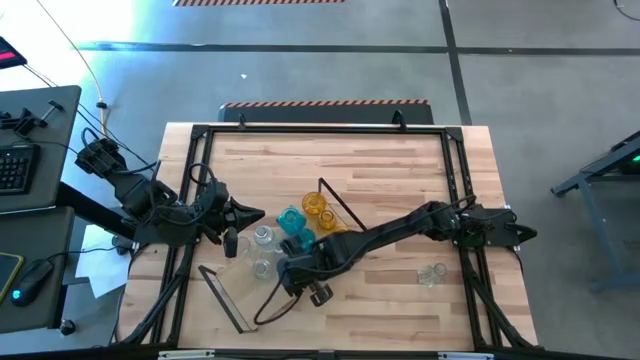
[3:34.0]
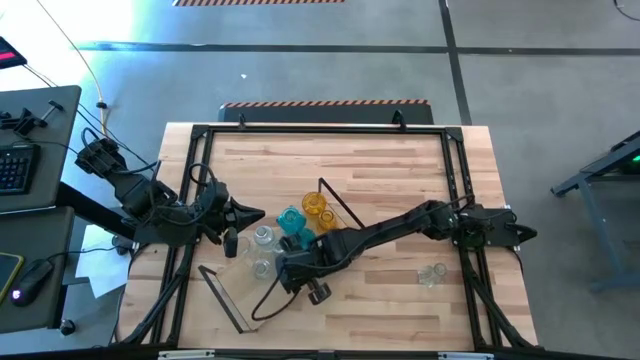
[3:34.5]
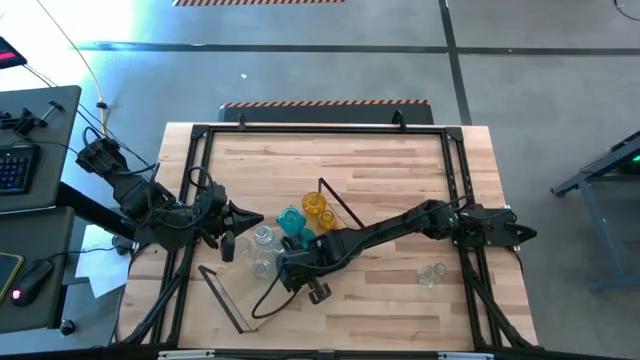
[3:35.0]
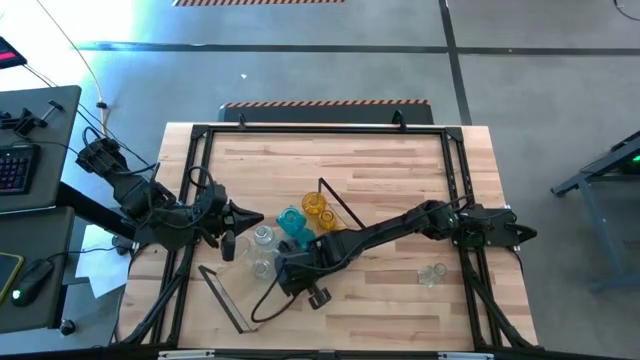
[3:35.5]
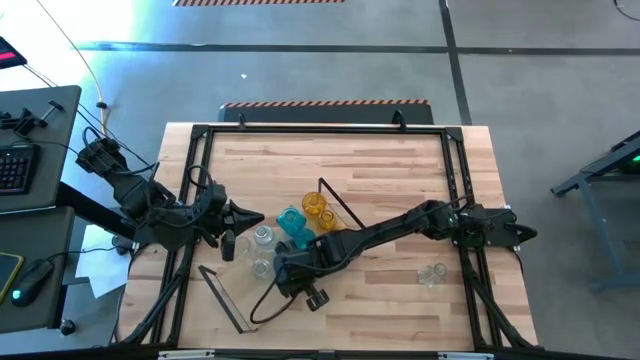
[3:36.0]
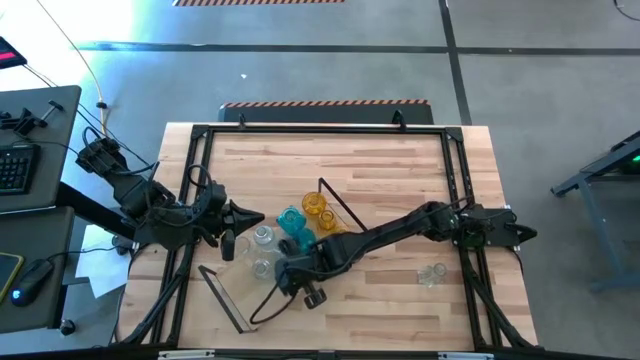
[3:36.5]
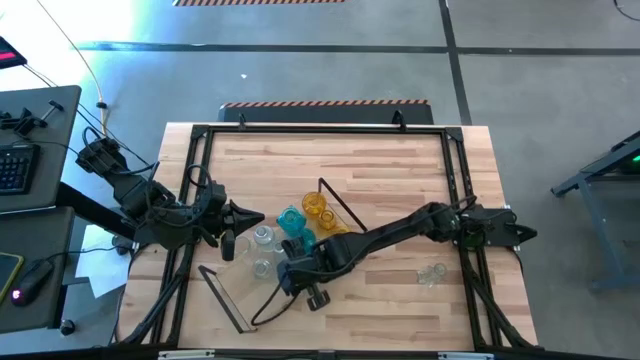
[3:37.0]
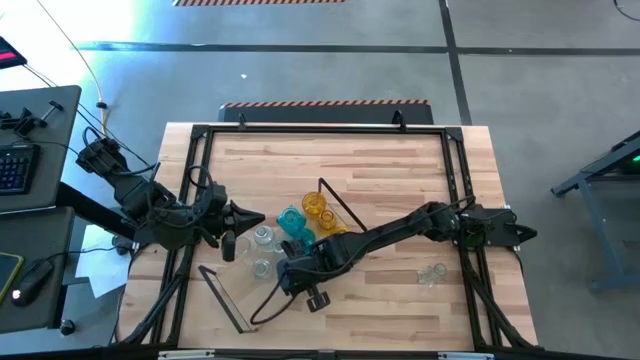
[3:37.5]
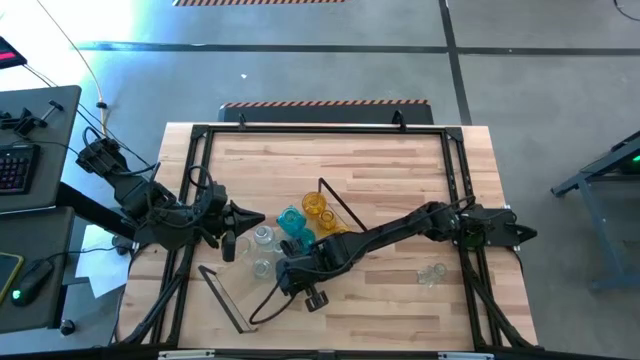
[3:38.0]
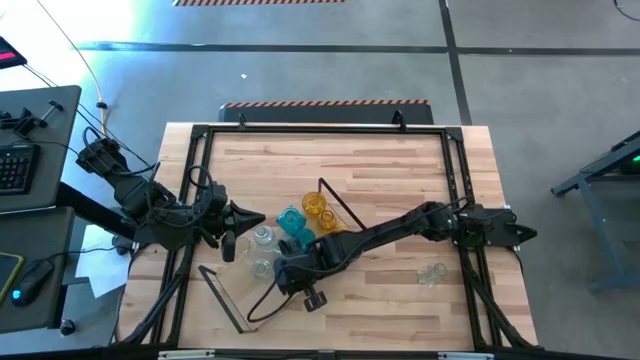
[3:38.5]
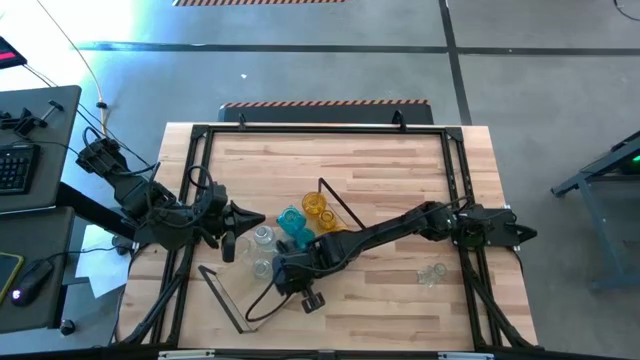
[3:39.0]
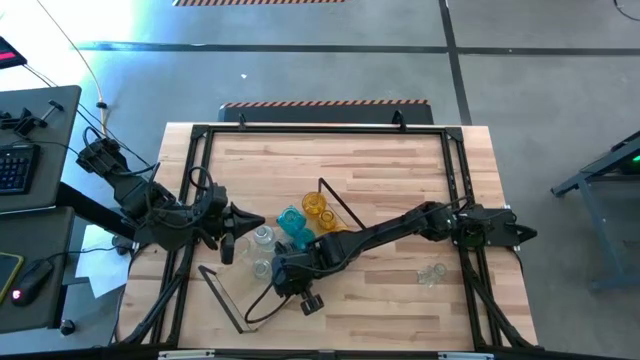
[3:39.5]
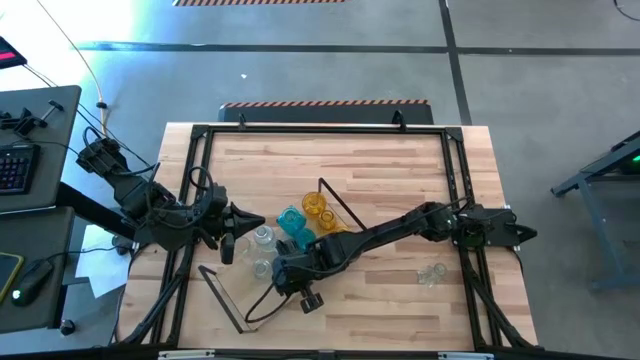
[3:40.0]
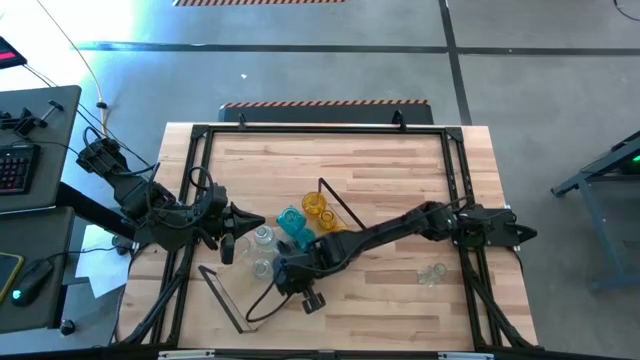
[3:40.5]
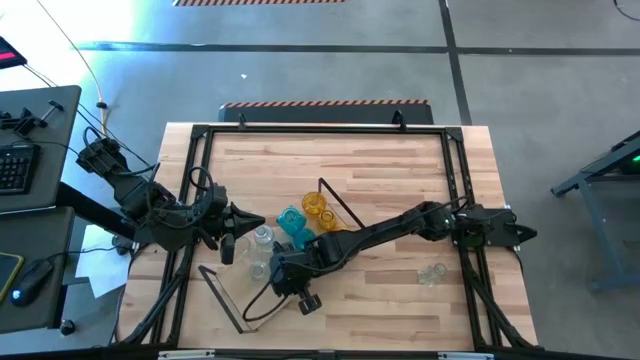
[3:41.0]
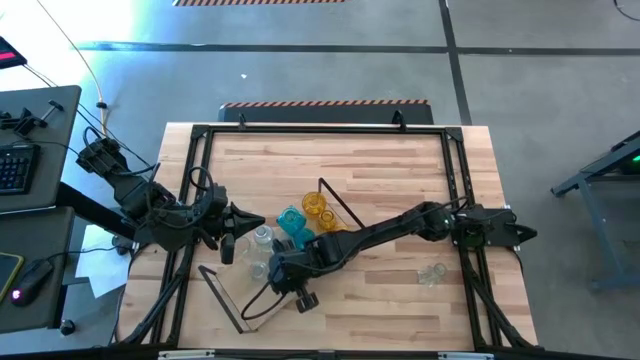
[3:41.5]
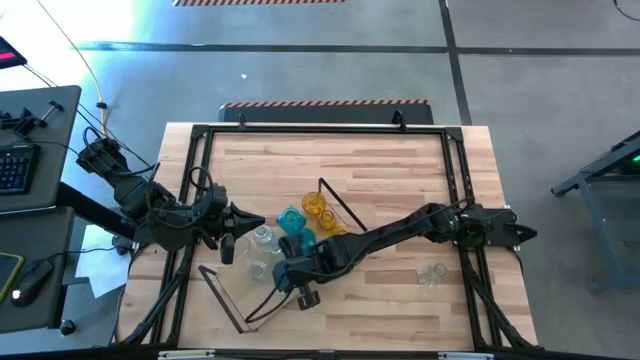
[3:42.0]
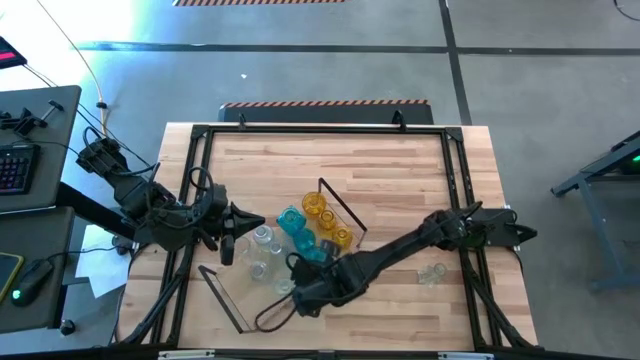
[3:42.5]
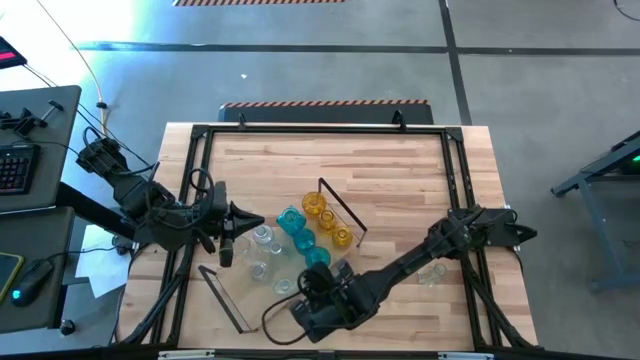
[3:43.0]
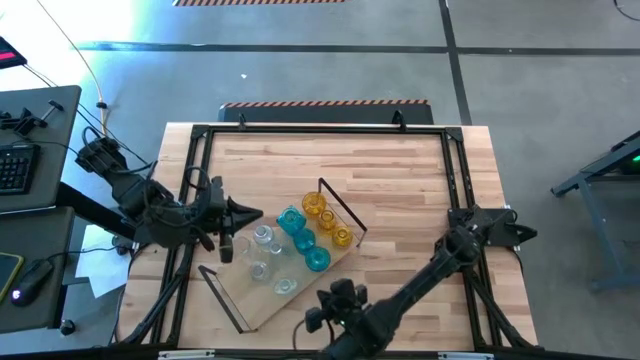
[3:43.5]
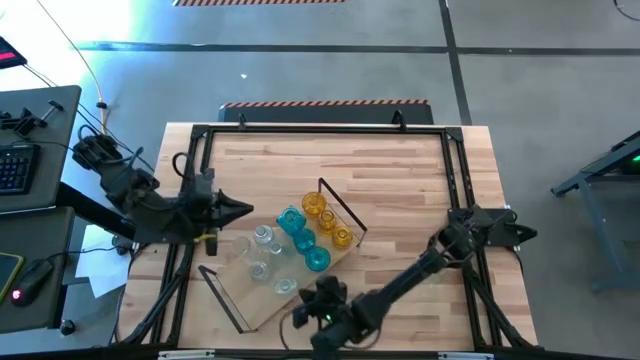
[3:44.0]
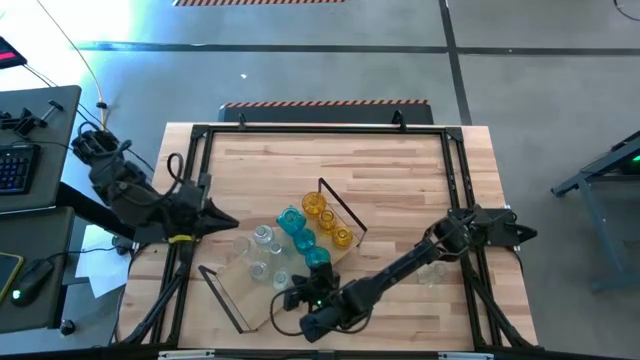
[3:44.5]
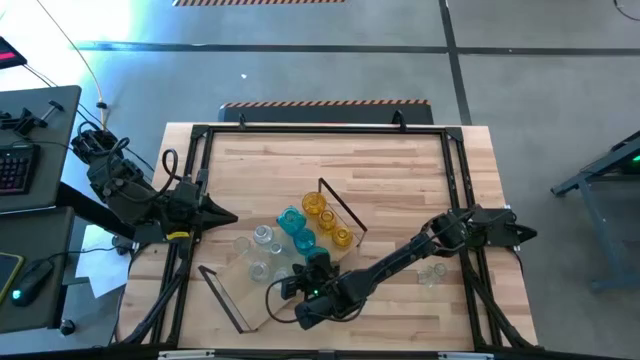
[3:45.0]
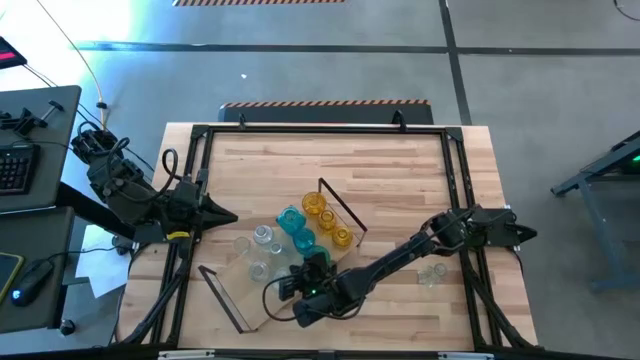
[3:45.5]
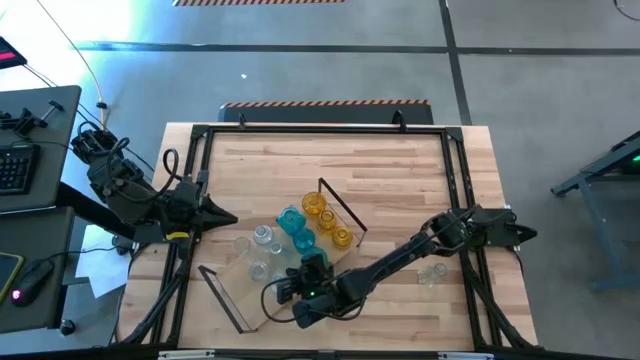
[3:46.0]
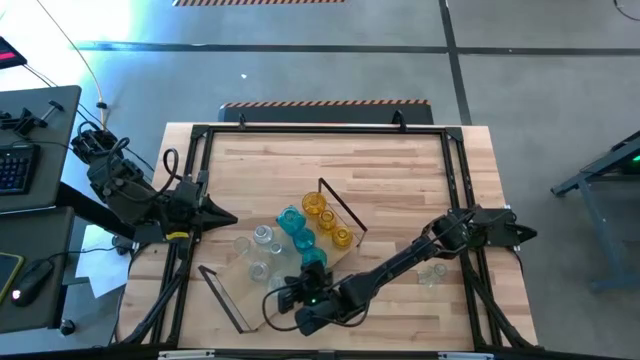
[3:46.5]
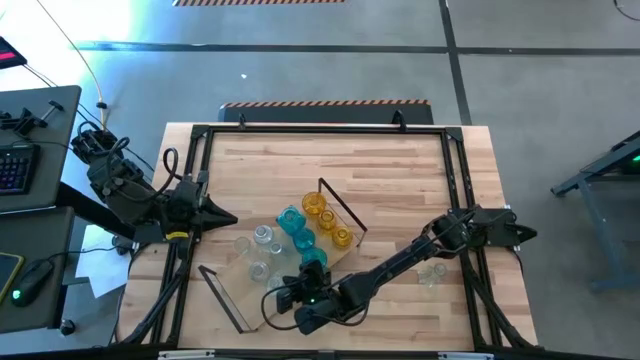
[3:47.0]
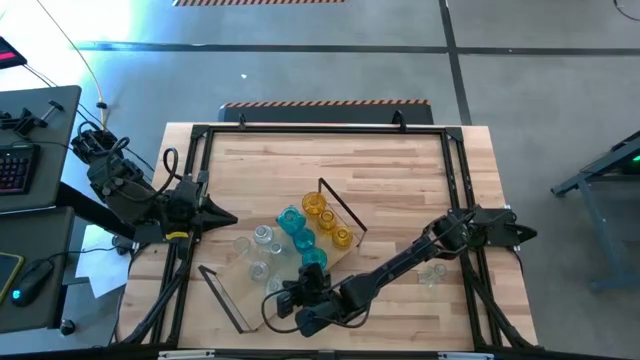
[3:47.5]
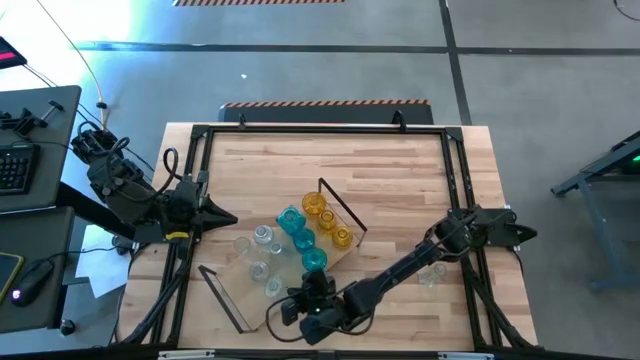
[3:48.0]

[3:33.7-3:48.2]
Task: sort vases onto shelf
Put the transparent vase on the shelf aligned with the other transparent vases

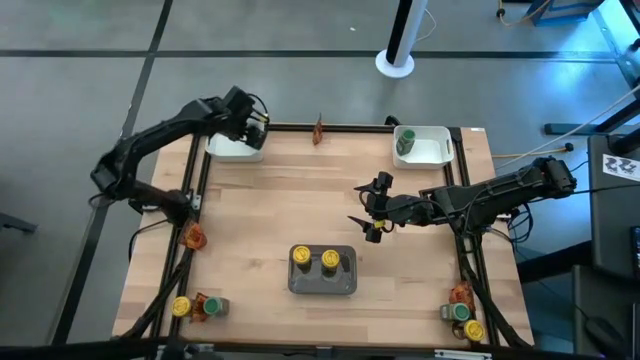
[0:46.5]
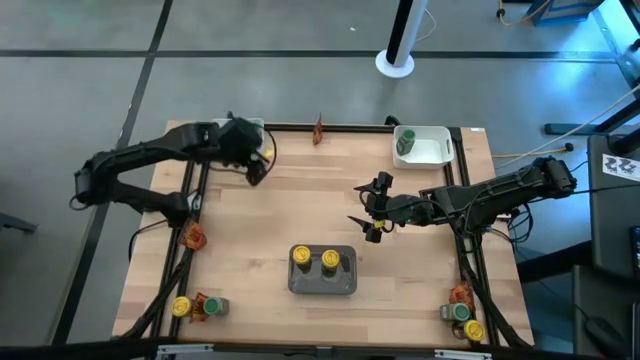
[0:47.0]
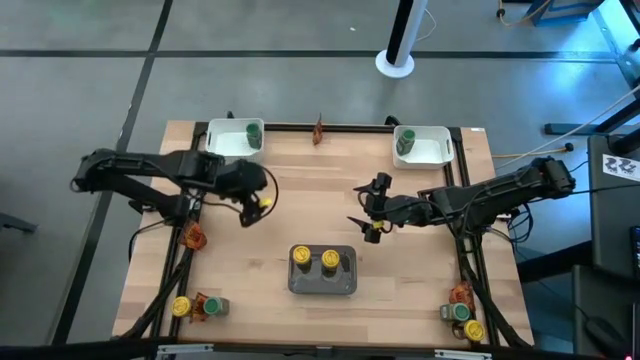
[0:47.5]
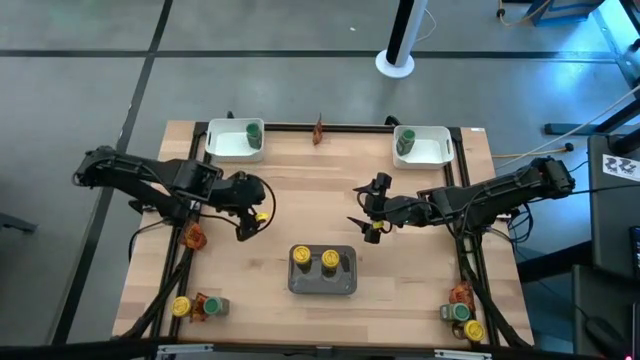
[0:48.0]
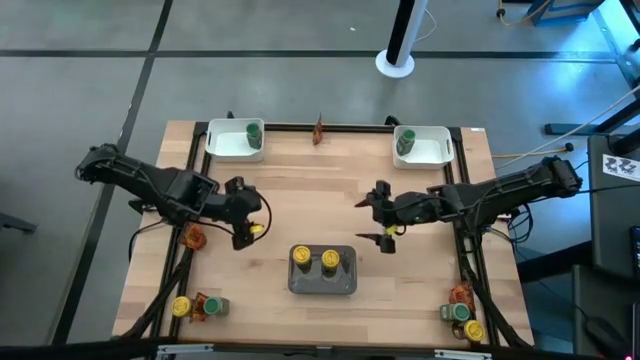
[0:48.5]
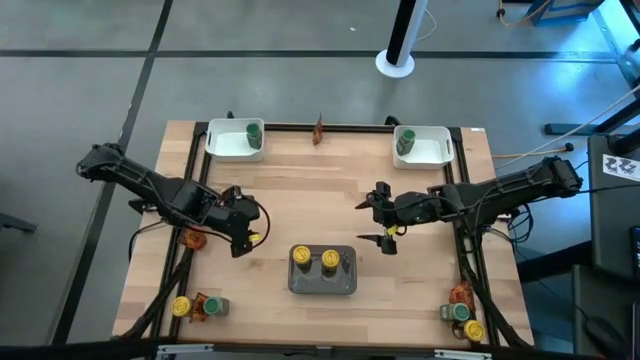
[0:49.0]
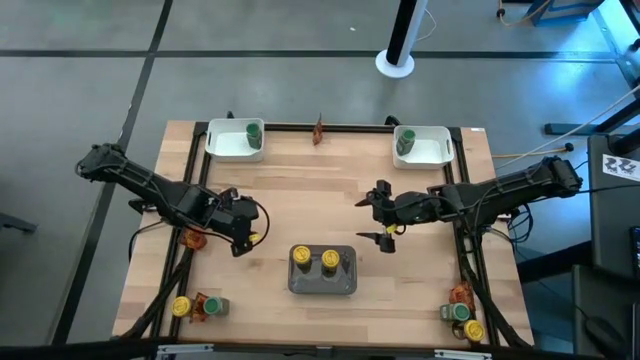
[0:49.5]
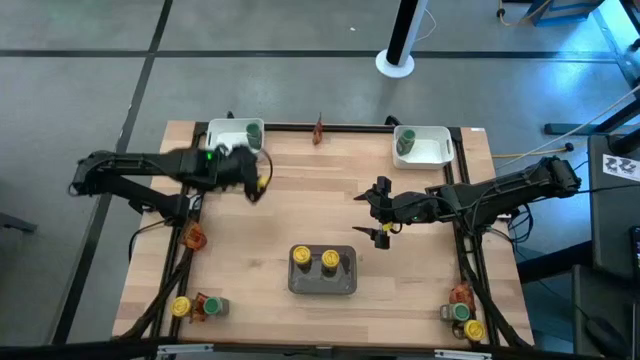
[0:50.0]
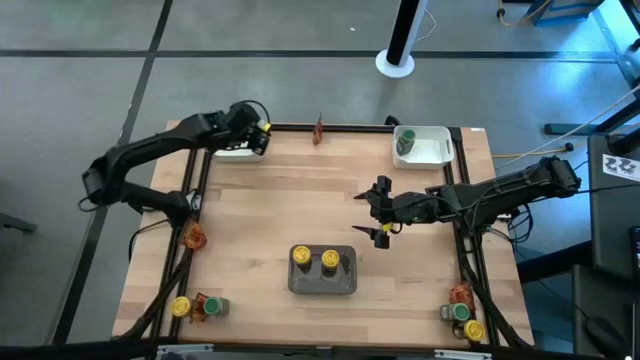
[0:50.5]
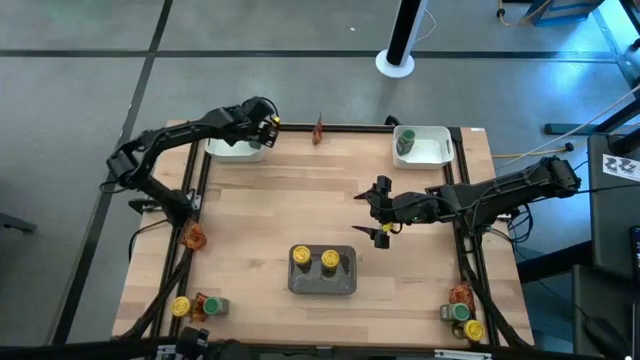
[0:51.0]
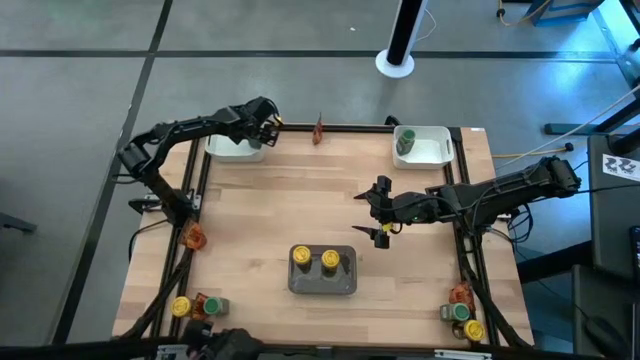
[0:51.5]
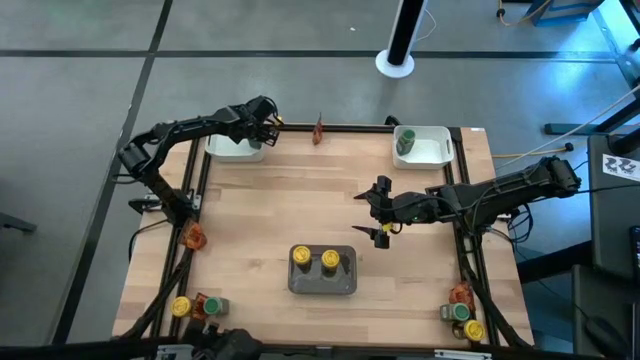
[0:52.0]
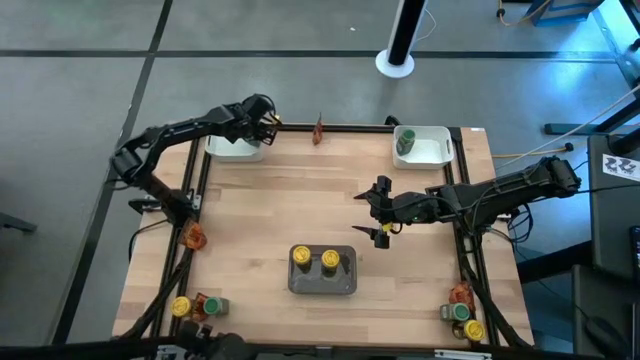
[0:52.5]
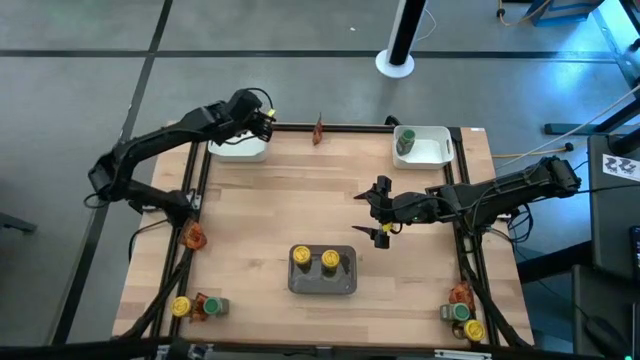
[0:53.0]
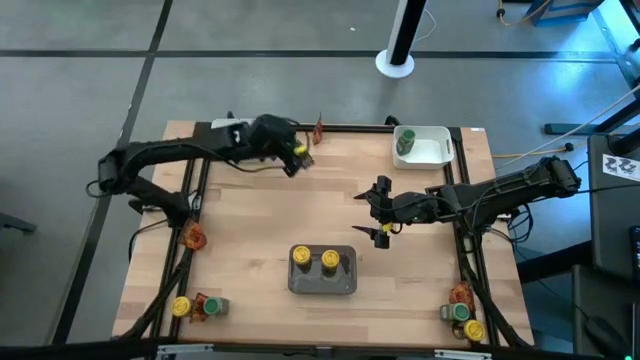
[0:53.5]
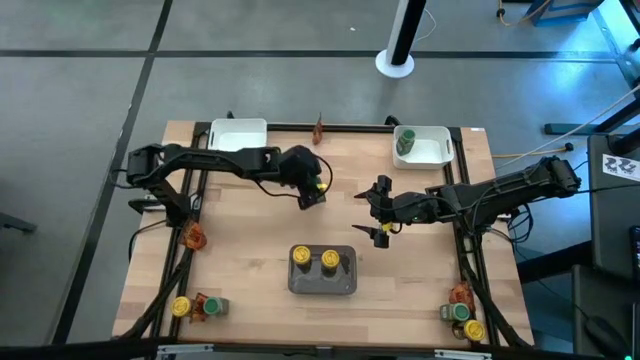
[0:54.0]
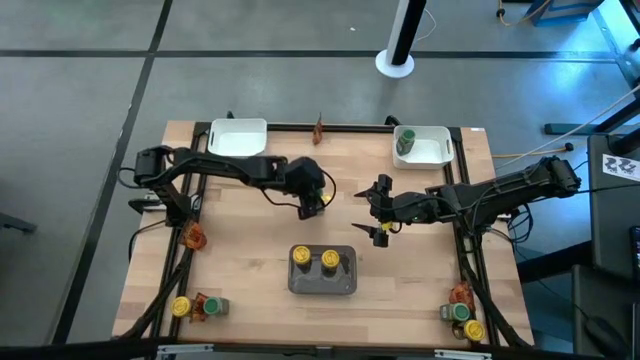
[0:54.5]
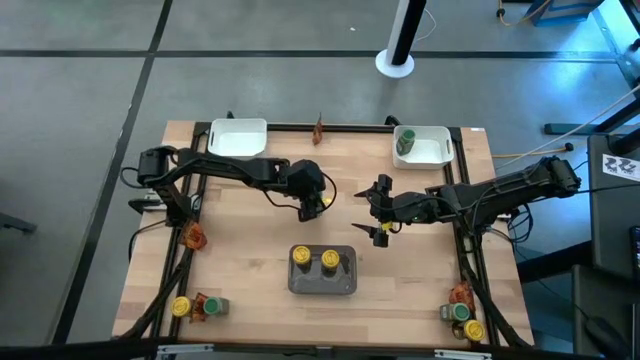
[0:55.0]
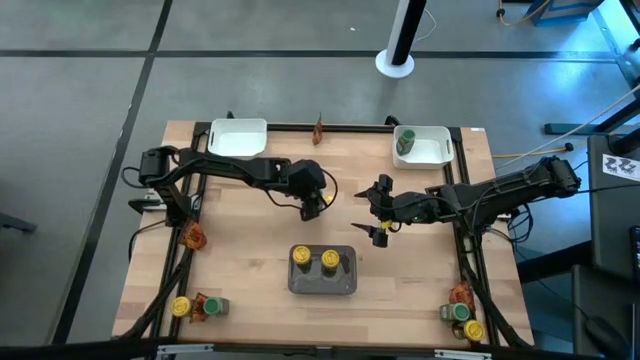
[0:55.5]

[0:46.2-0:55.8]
Task: Sort spices by type
Remove the green seasoning bottle from the left white bin
